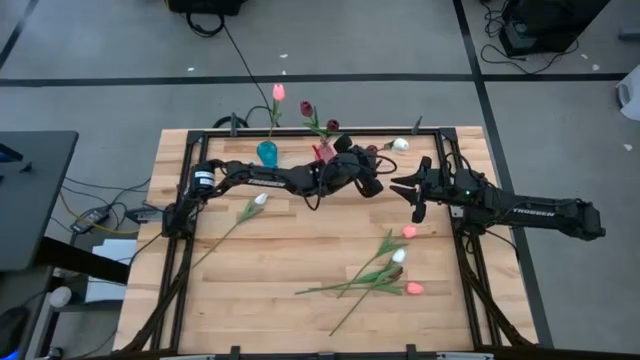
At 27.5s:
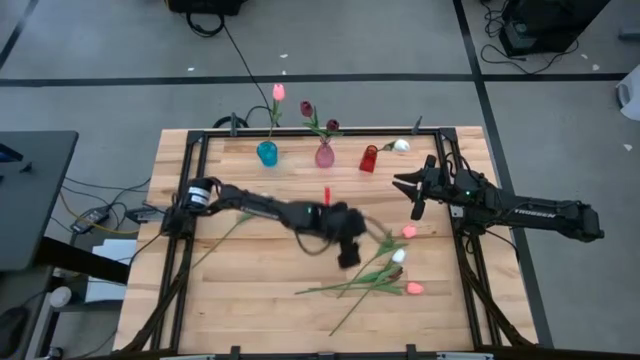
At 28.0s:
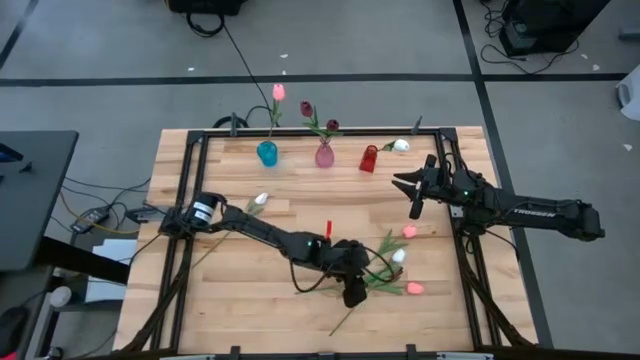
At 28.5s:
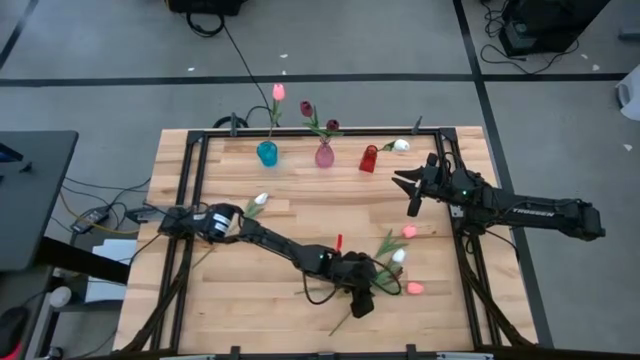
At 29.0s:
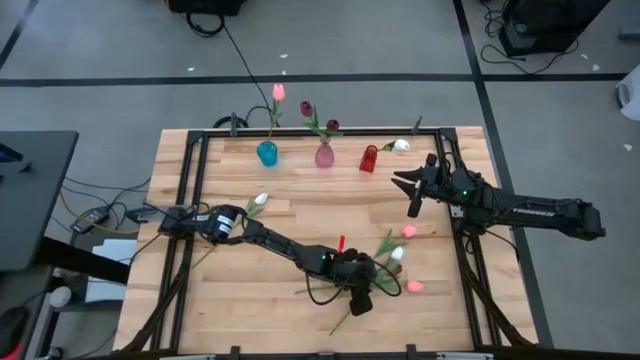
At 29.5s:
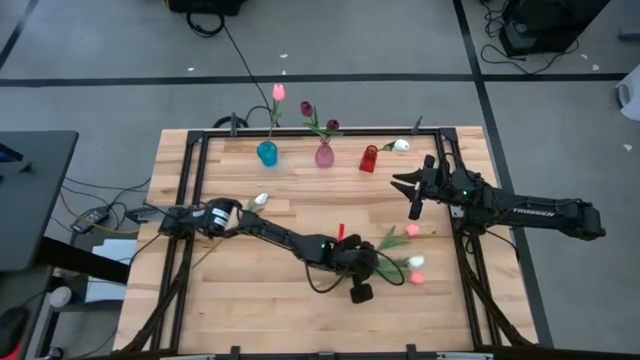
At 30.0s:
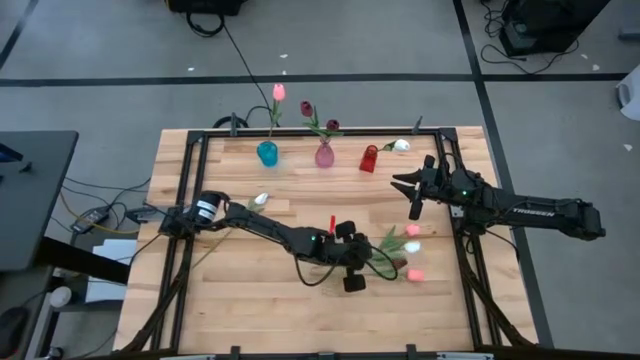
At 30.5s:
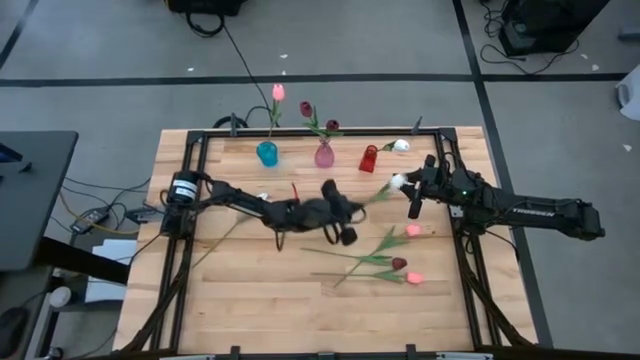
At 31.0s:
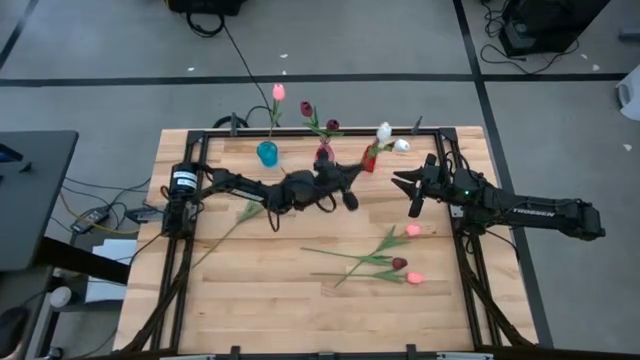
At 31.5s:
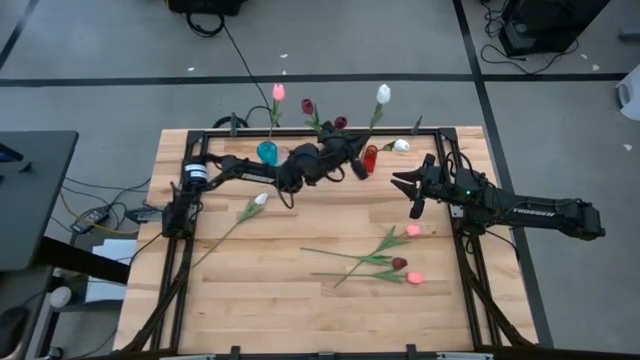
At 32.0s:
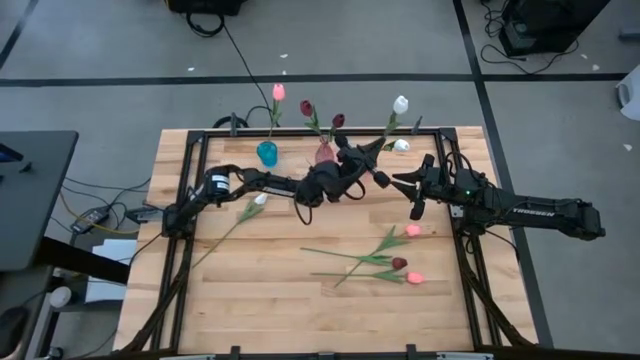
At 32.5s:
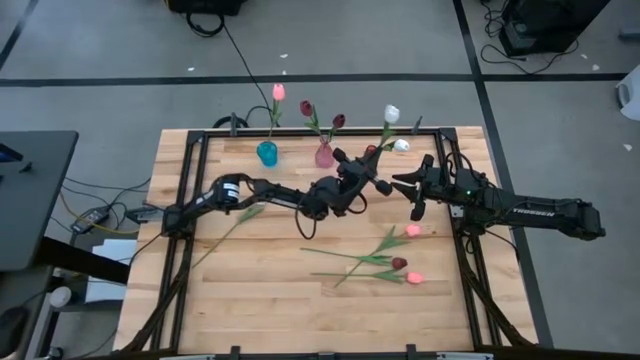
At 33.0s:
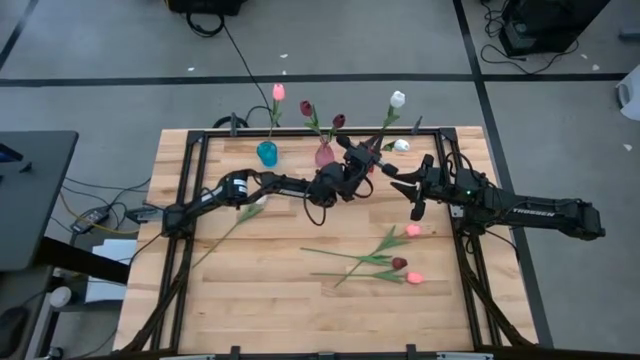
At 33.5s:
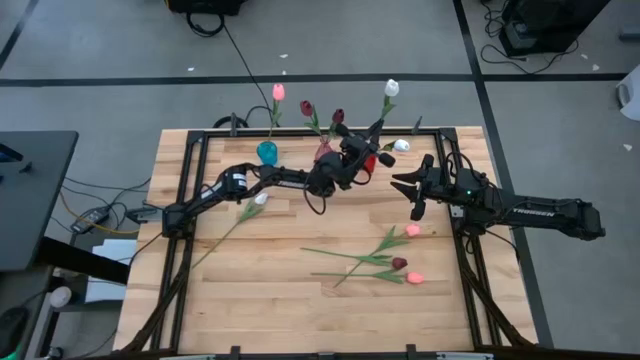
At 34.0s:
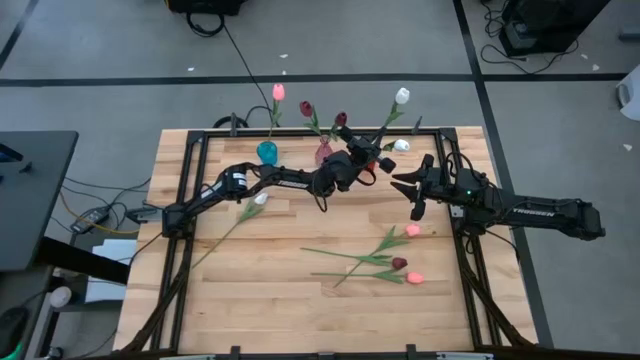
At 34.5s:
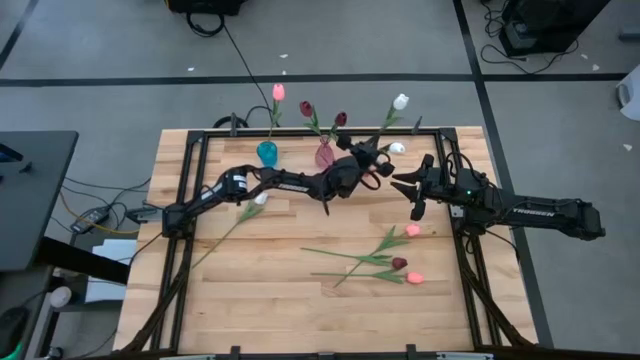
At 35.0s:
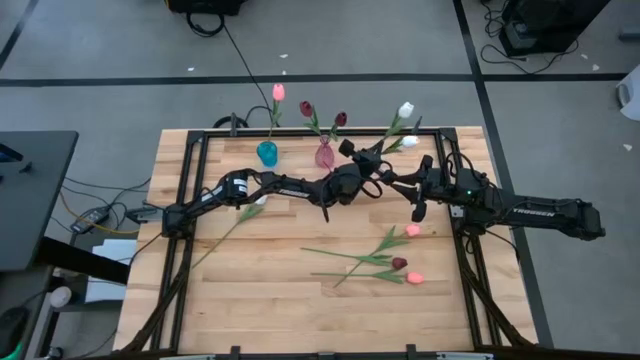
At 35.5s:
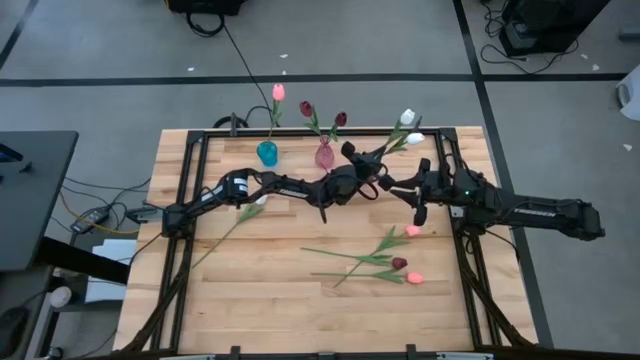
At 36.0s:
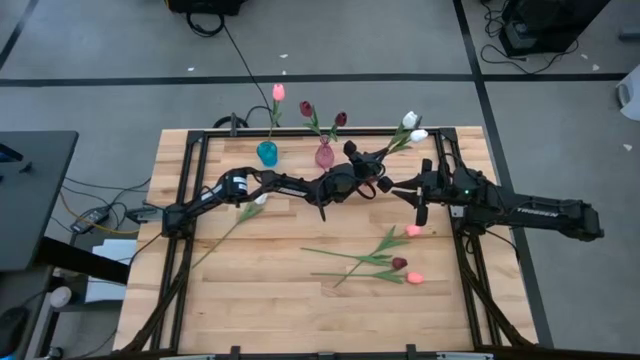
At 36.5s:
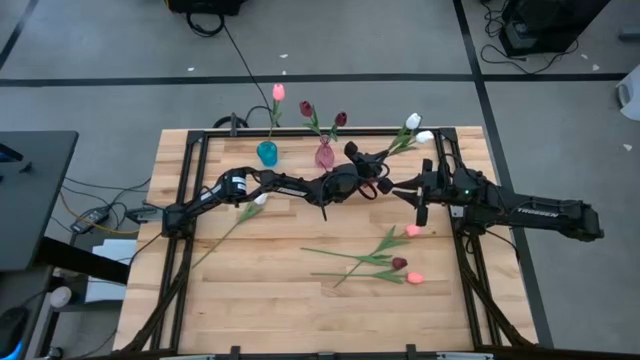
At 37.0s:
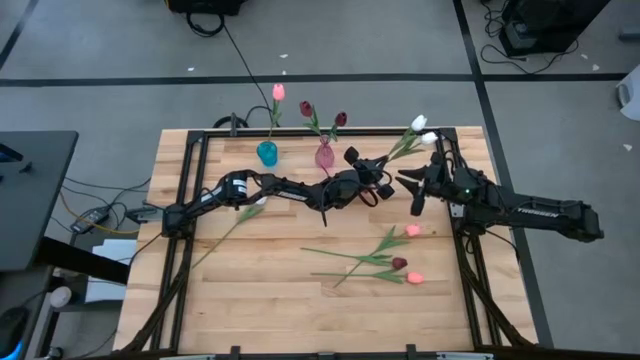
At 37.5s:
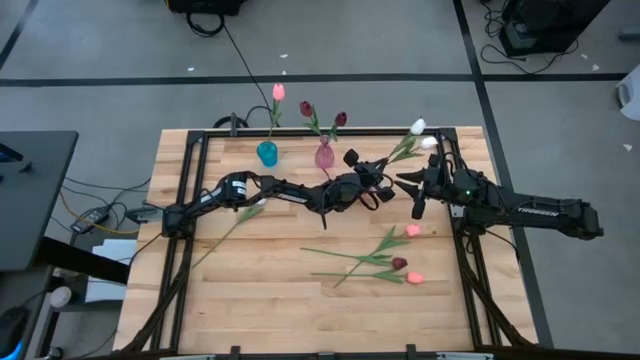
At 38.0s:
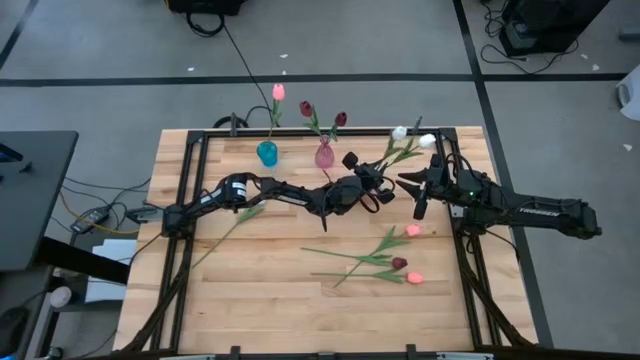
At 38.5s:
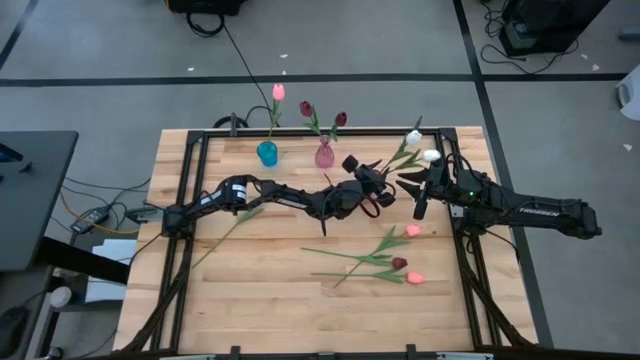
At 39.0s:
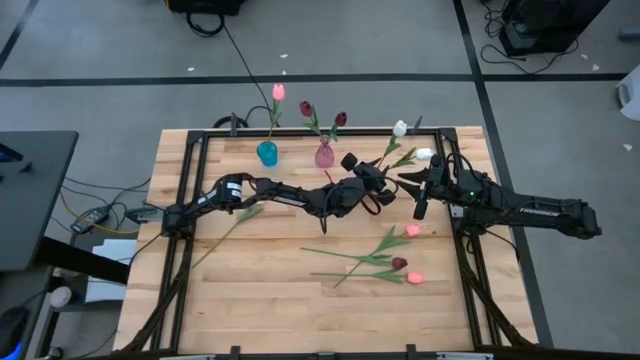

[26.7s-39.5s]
Task: Sort flowers into vase by color
Put the bottom right white flower into the red vase

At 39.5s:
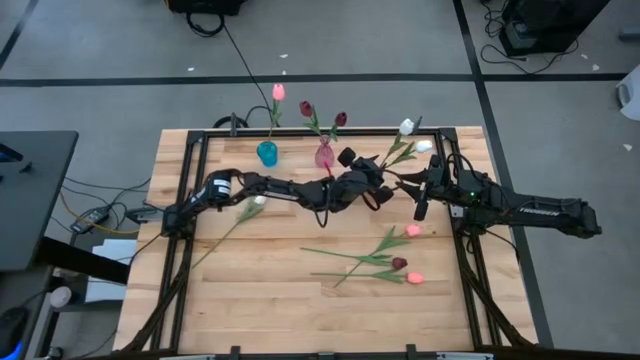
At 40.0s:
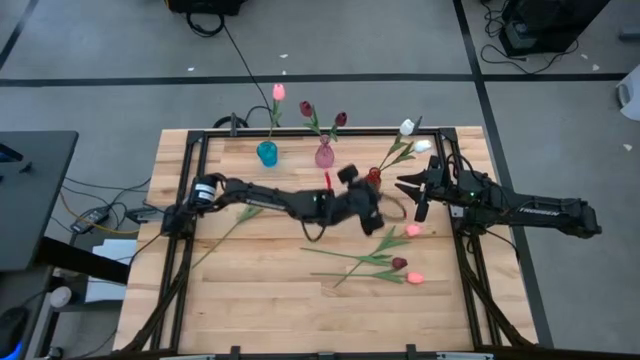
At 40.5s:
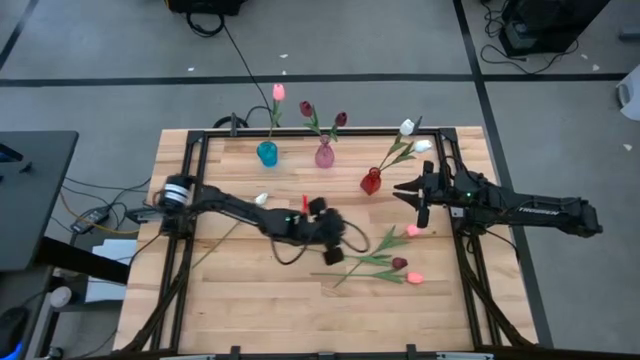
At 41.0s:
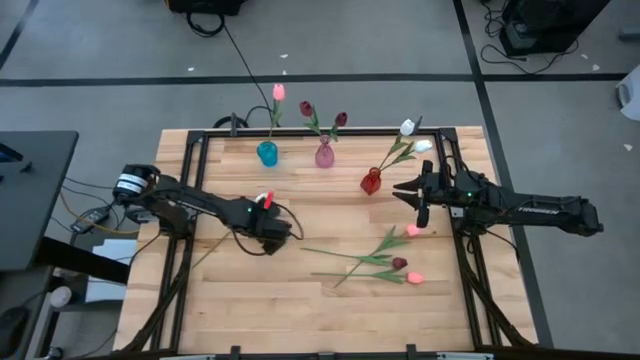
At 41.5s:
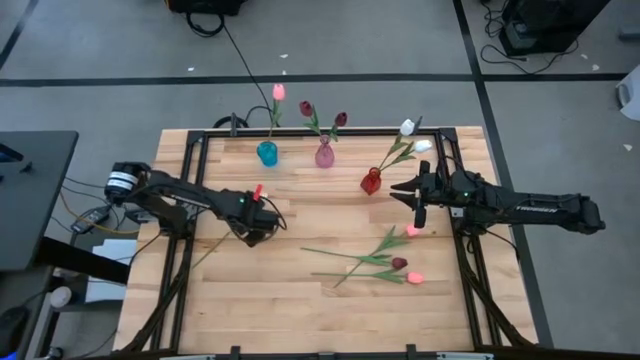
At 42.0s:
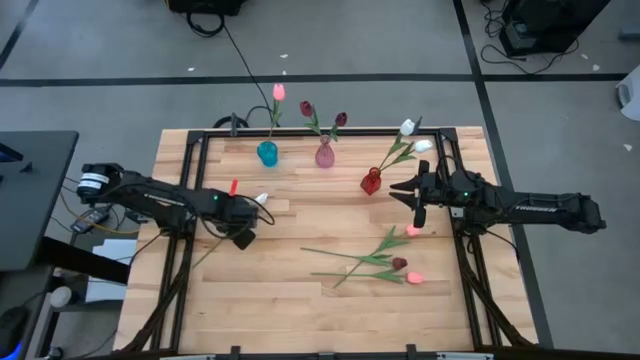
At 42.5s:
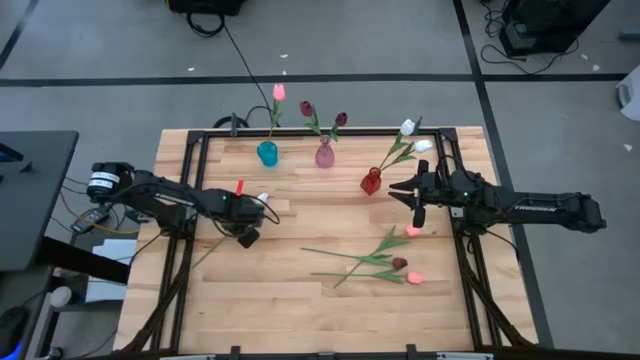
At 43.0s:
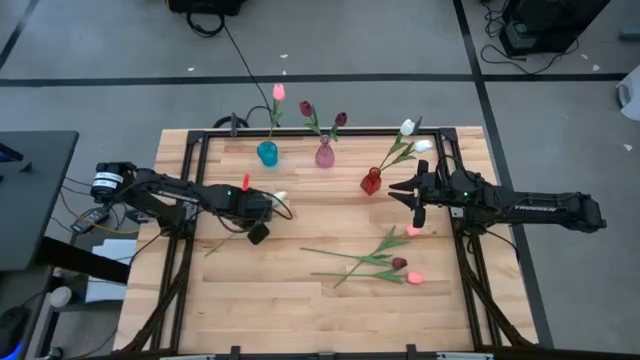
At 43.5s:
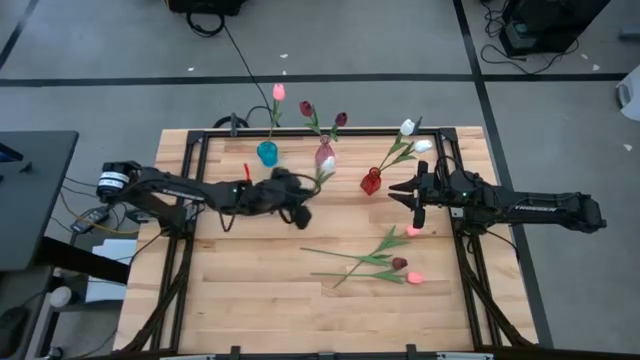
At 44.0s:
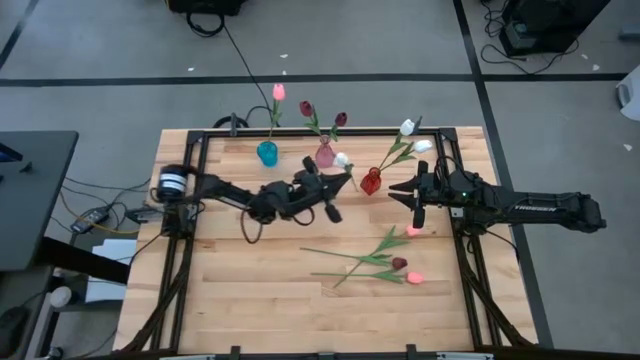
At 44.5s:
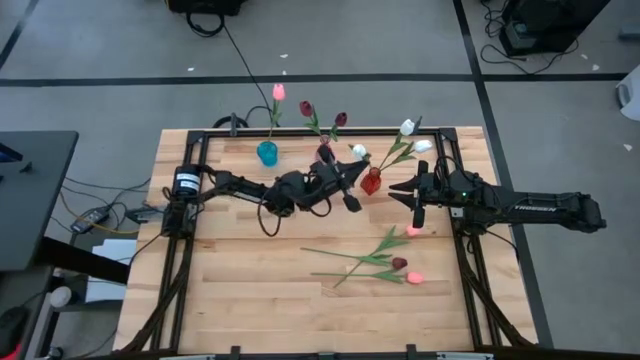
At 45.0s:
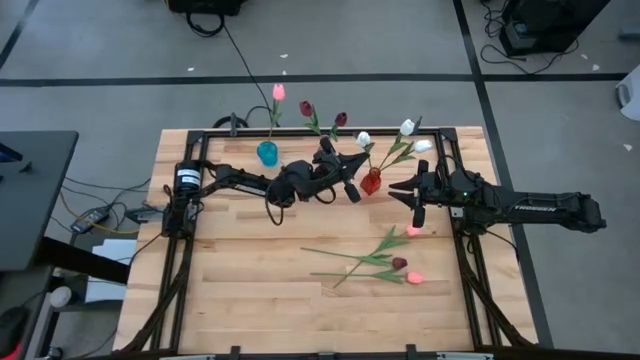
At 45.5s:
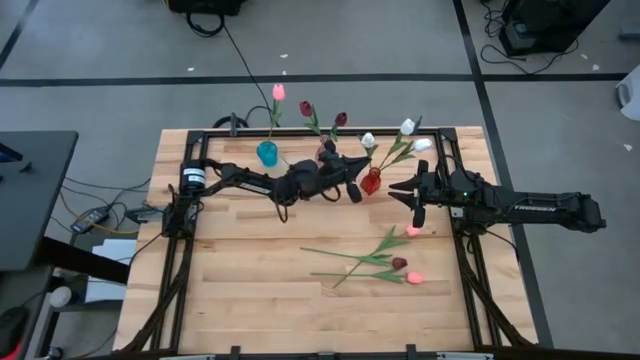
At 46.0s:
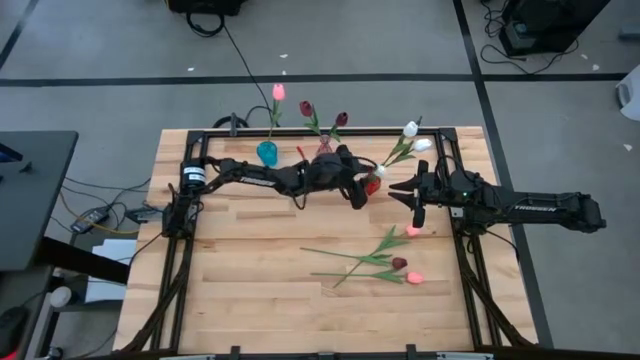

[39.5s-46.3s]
Put the white flower into the red vase
